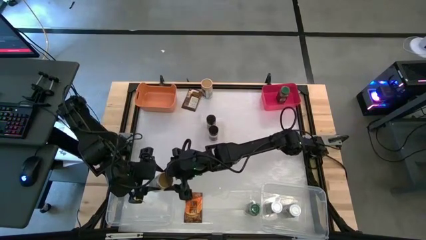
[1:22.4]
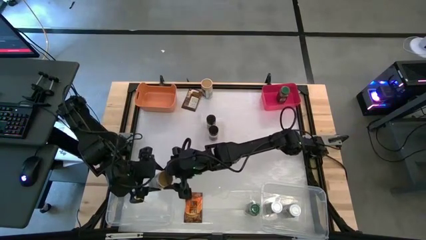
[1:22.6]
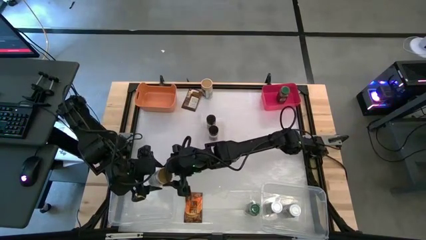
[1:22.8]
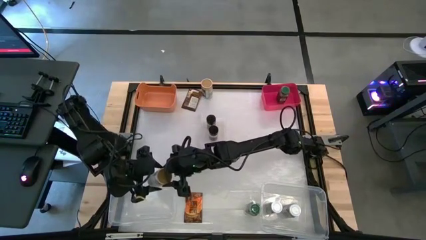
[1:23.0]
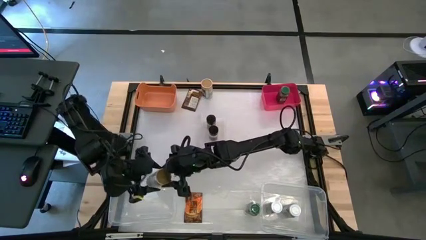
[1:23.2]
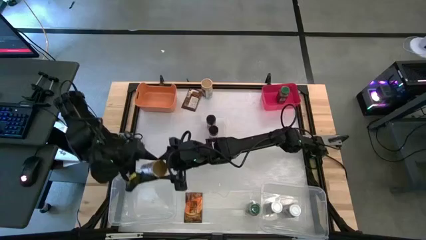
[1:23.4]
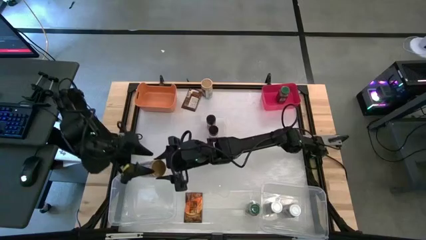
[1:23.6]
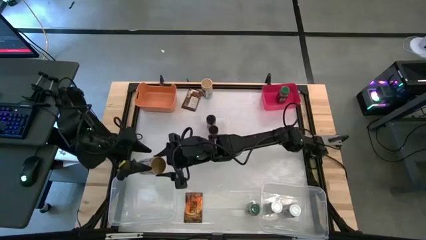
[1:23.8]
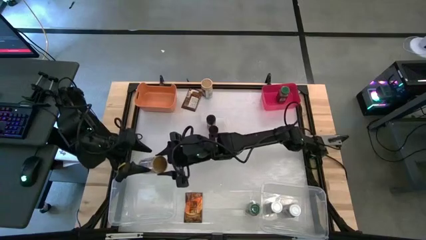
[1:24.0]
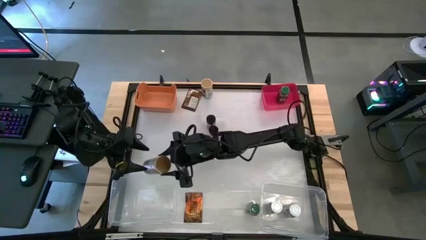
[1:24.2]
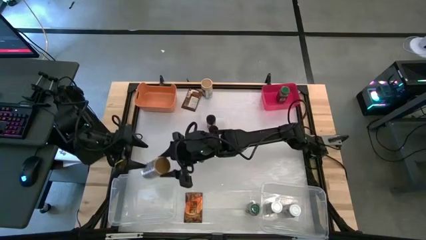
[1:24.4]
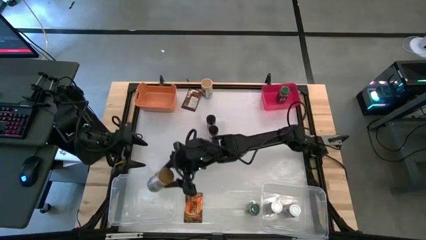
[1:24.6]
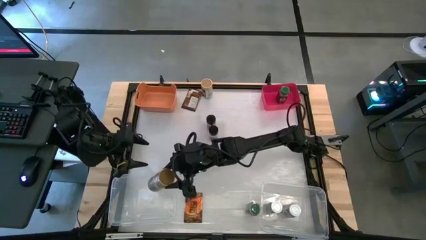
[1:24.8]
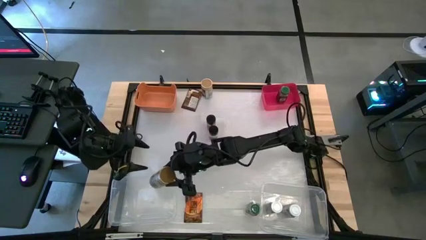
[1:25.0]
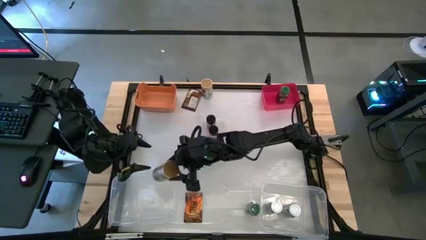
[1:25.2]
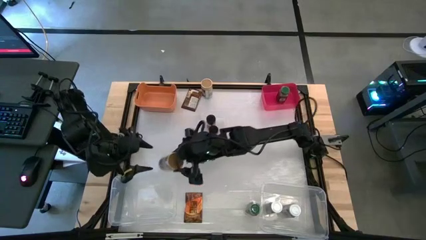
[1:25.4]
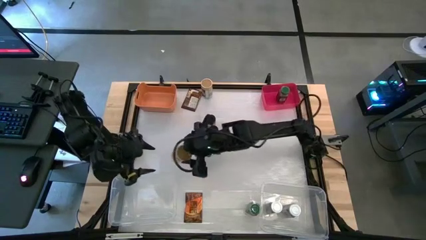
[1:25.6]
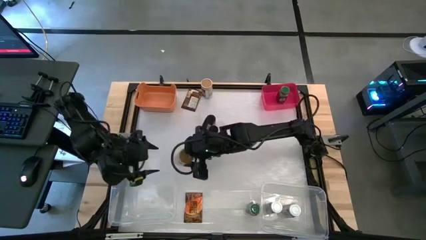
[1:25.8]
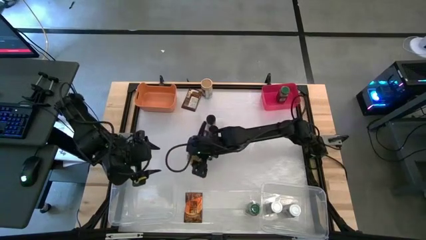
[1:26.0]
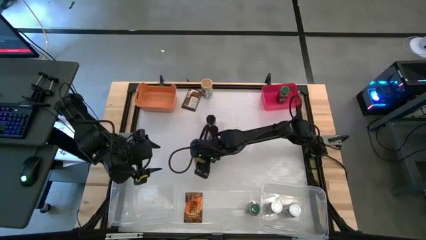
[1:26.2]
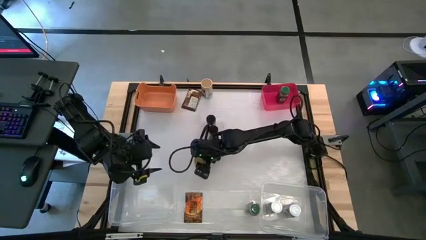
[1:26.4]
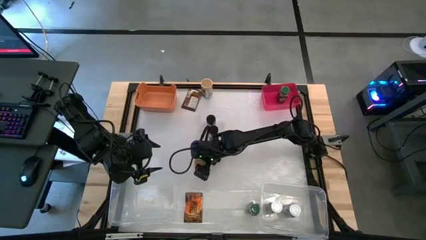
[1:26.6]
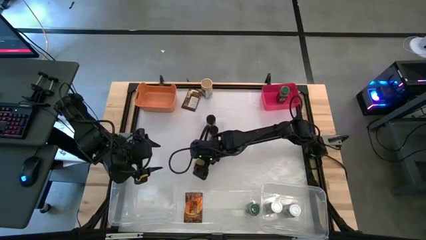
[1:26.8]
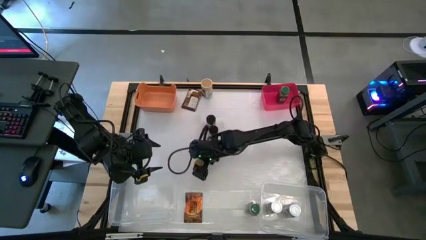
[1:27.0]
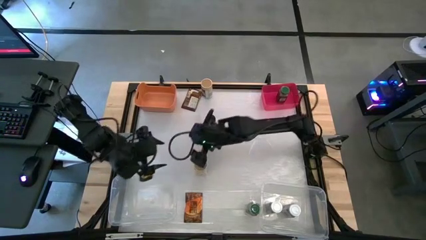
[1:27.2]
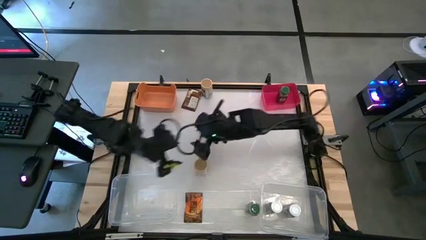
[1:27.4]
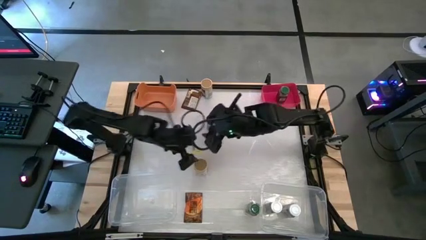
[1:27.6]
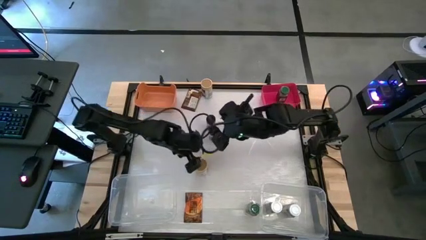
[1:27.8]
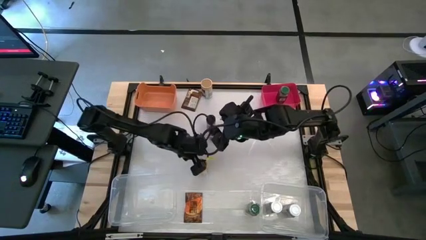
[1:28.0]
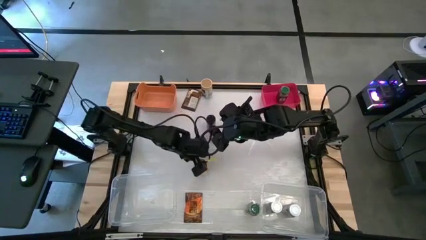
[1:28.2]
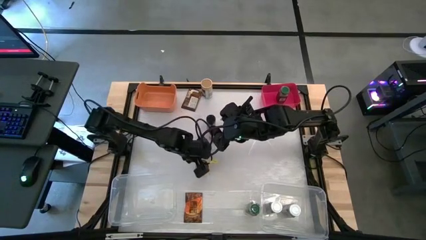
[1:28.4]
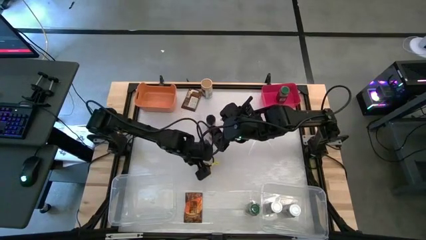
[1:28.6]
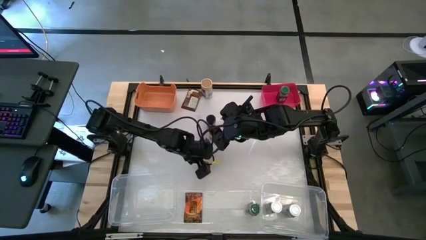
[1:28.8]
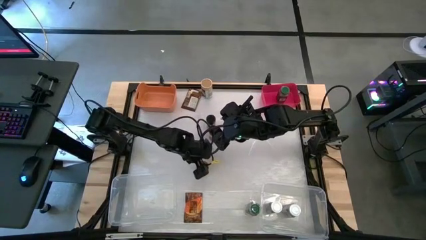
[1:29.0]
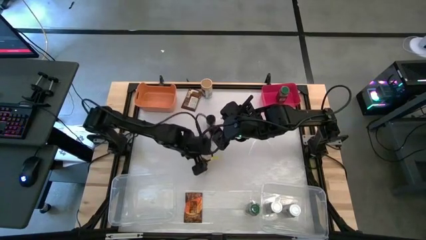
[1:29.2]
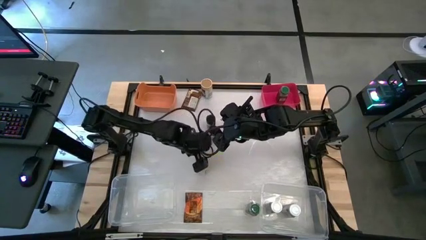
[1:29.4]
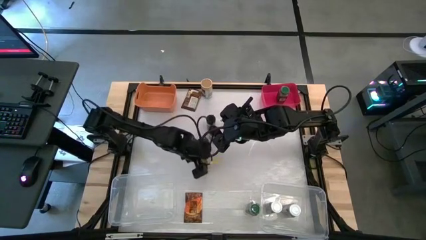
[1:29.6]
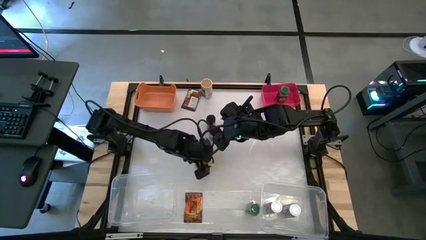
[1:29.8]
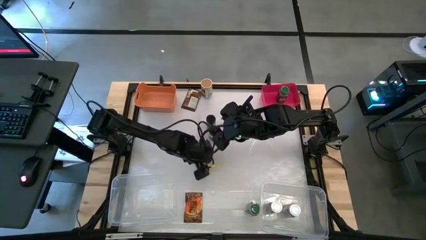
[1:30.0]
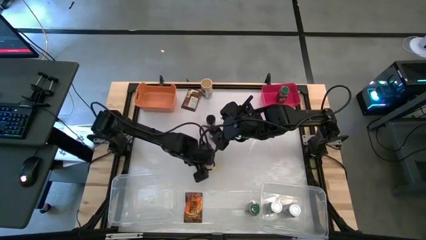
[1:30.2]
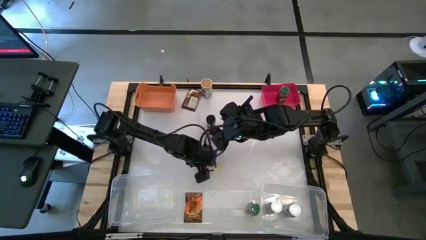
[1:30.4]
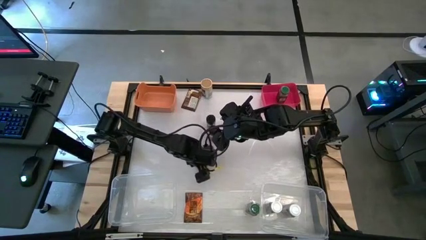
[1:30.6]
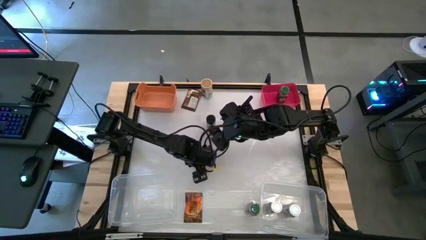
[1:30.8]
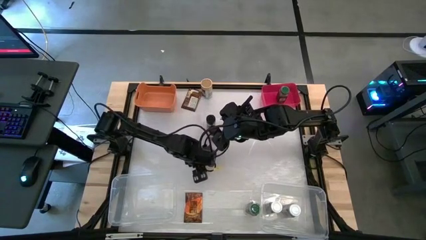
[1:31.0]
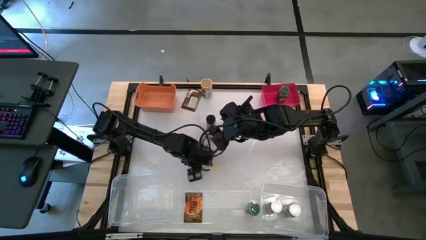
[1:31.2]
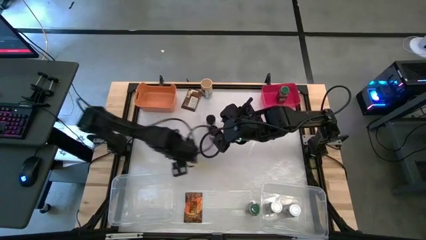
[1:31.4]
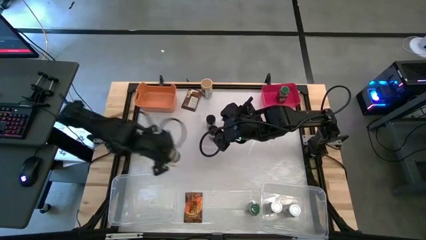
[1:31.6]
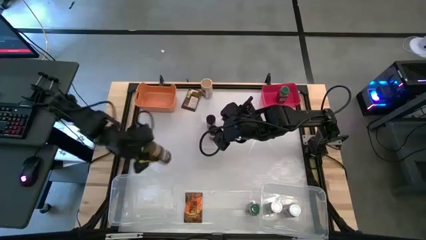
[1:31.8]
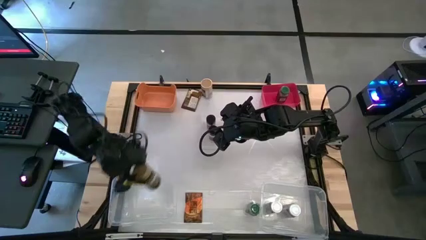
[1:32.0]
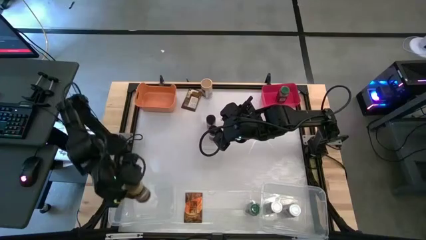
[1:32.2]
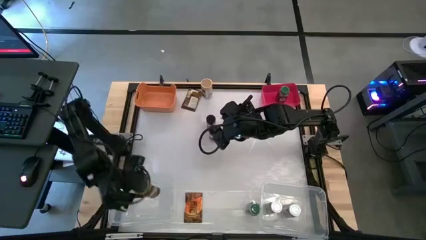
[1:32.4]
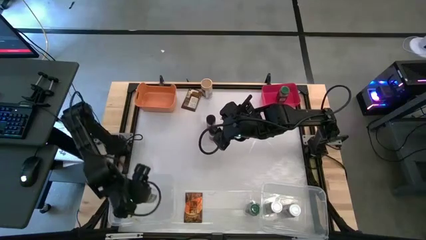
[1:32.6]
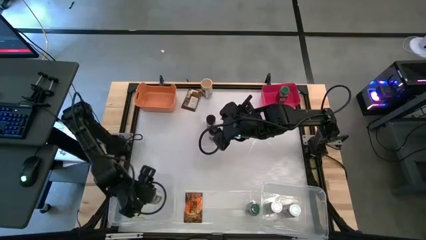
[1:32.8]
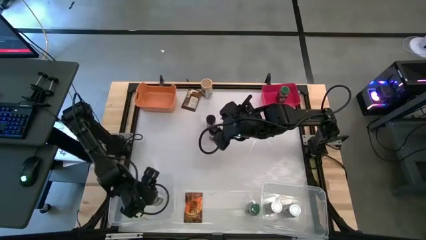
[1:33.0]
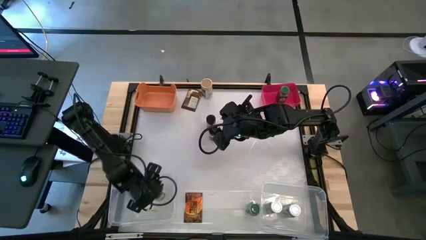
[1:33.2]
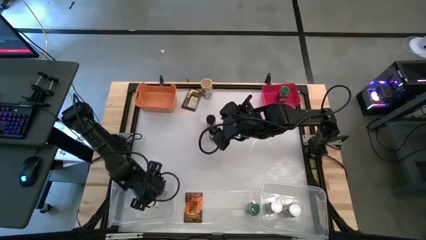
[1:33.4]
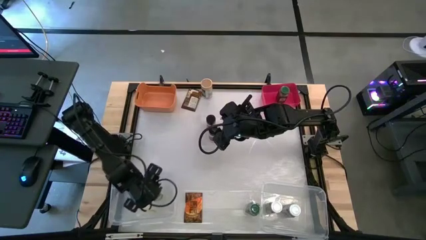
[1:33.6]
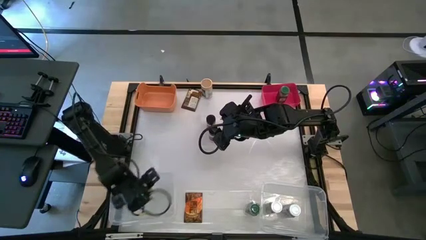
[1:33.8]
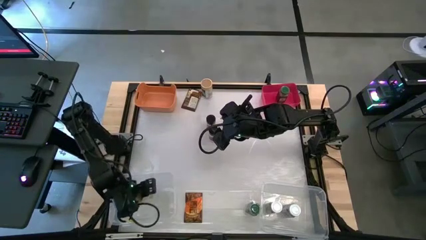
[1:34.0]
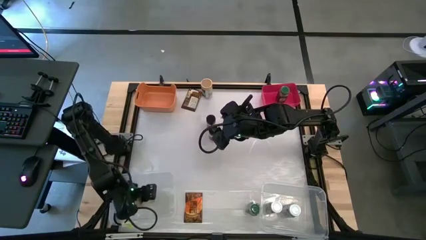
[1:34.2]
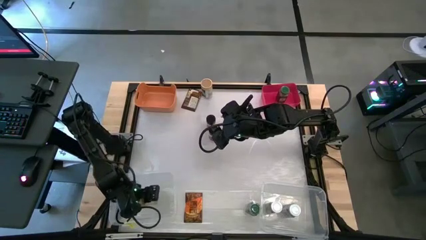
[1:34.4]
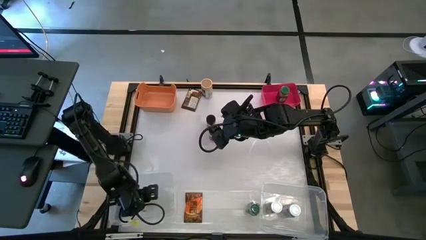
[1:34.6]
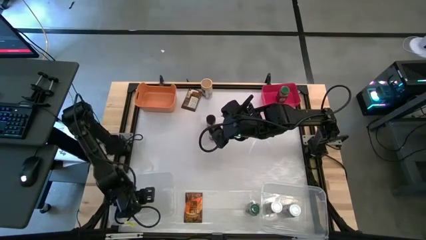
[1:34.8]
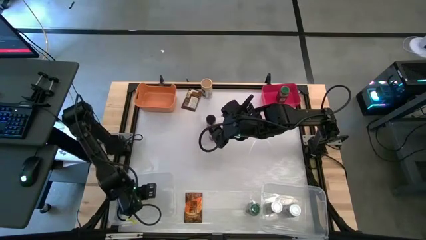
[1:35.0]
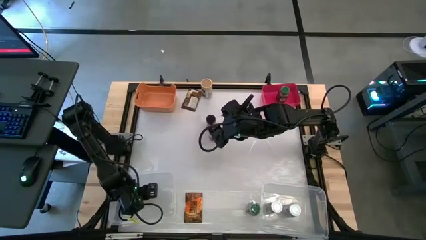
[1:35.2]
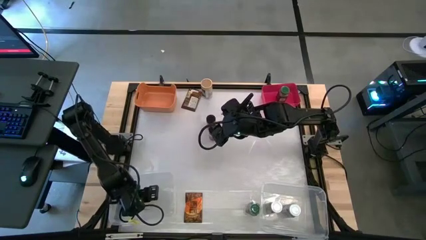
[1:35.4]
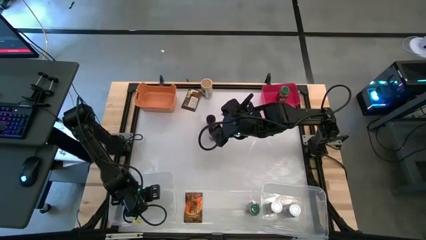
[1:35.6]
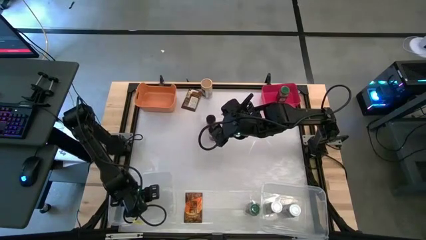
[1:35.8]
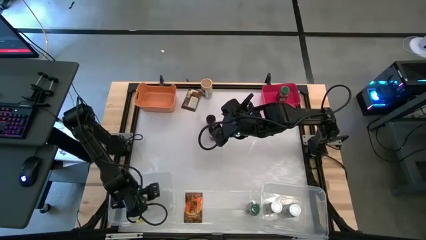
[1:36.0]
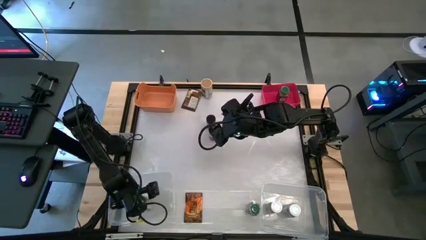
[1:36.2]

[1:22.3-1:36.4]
Task: Sort spices by type
Put the bottom gold seasoning bottle into the left transparent bin

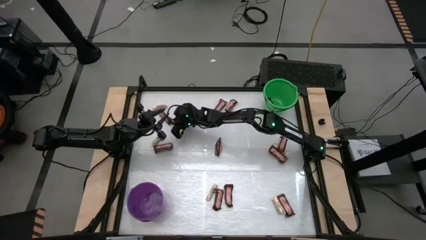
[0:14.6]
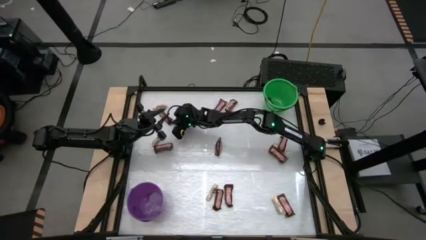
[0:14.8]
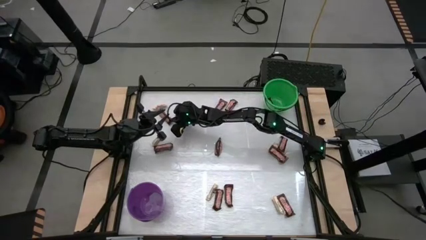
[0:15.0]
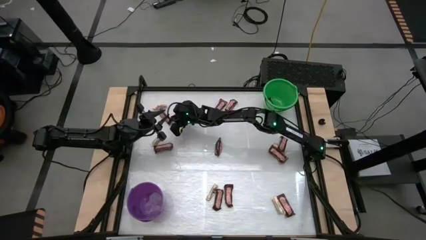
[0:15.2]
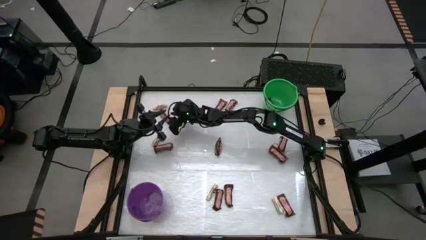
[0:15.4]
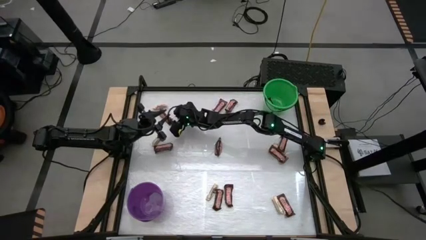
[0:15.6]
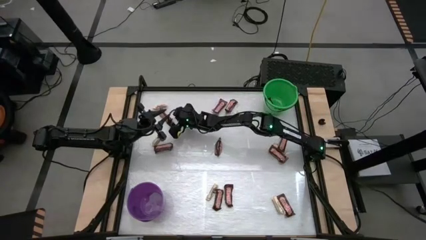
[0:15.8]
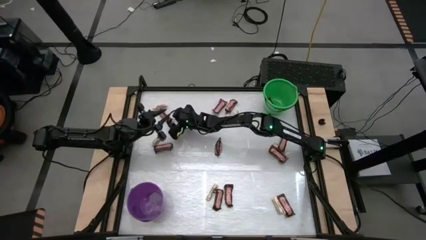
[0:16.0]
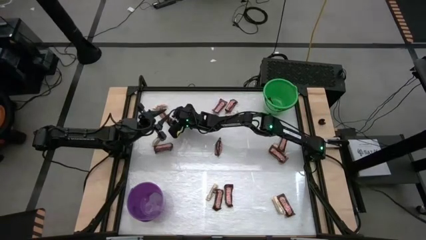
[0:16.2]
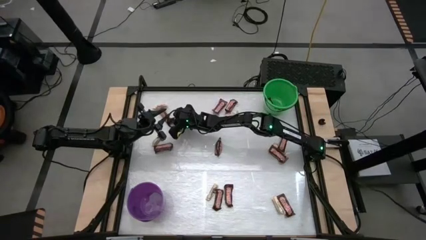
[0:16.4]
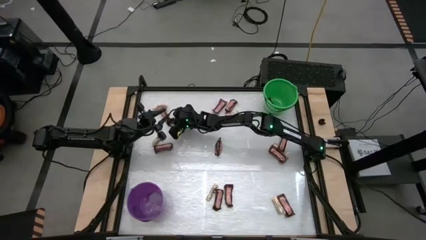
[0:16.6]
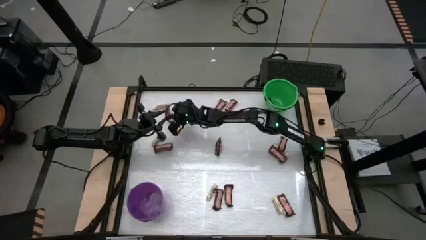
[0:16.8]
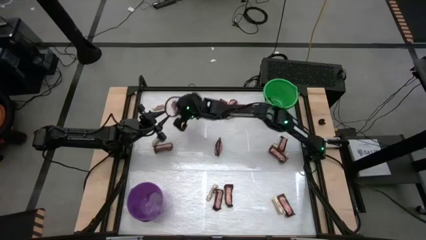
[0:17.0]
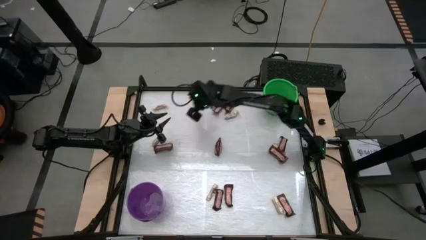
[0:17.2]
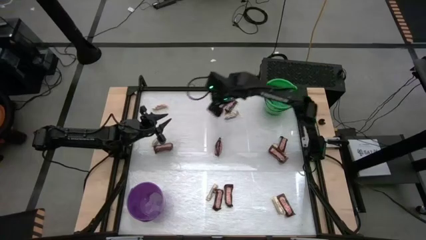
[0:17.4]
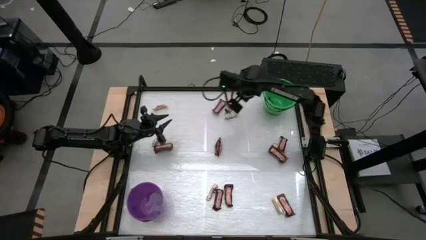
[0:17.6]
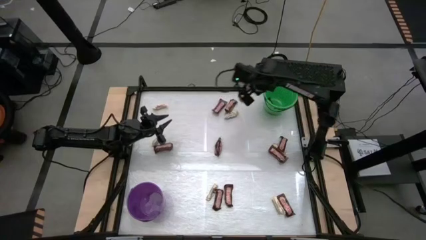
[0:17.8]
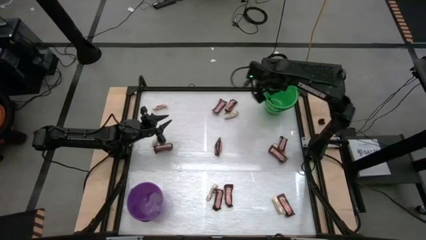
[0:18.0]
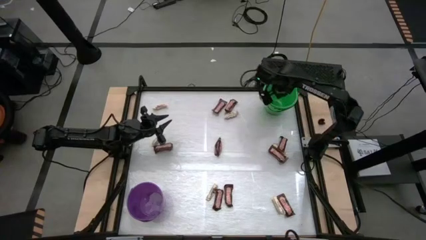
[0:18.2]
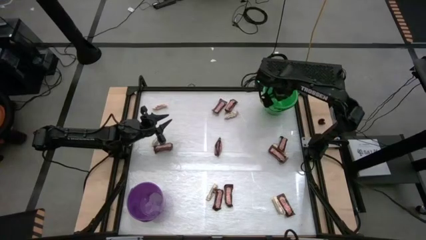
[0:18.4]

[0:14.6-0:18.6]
Task: Sort candy by brand, put in halloween buckets
Put the brown candy bar into the green bucket
